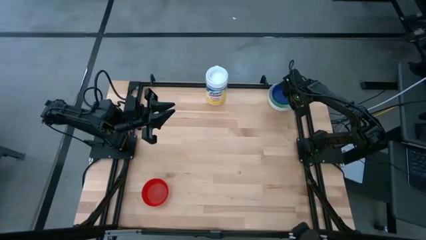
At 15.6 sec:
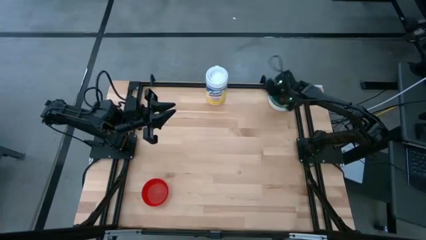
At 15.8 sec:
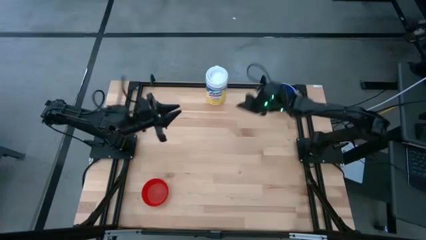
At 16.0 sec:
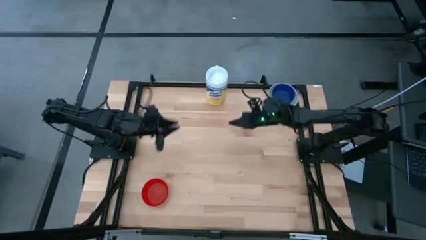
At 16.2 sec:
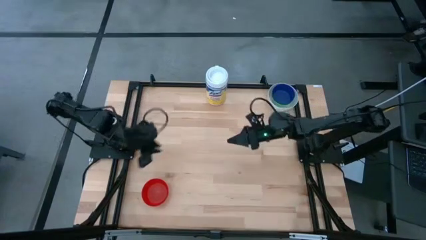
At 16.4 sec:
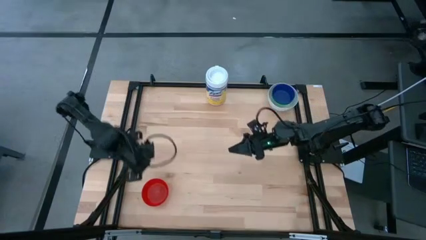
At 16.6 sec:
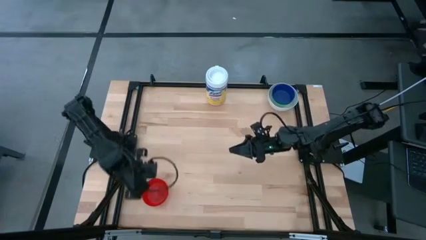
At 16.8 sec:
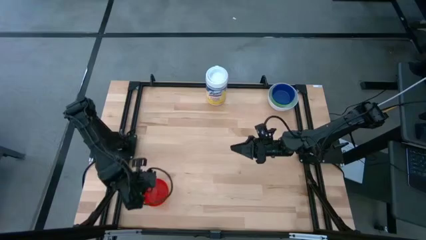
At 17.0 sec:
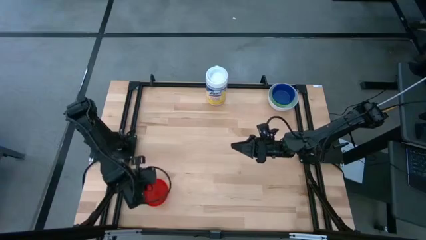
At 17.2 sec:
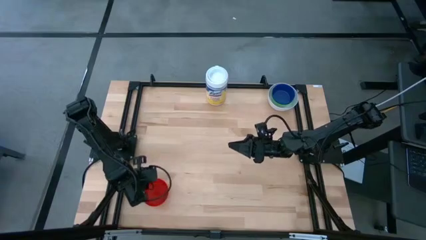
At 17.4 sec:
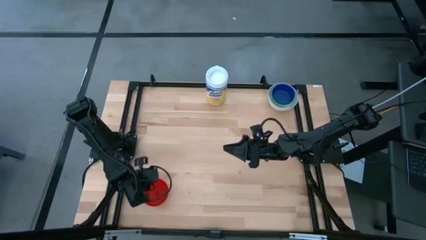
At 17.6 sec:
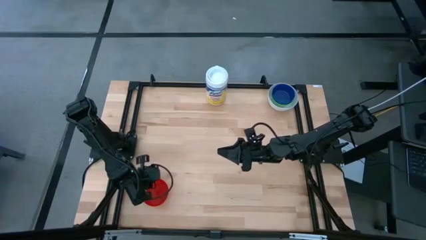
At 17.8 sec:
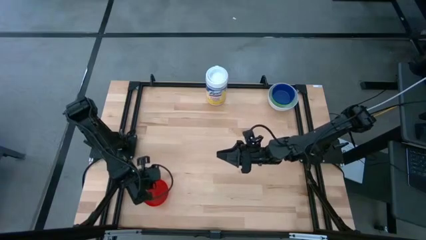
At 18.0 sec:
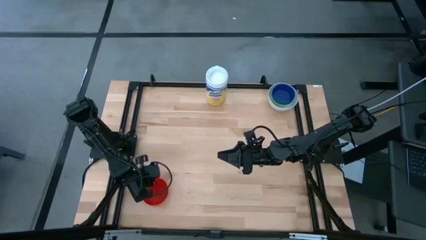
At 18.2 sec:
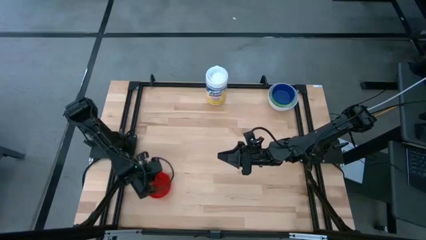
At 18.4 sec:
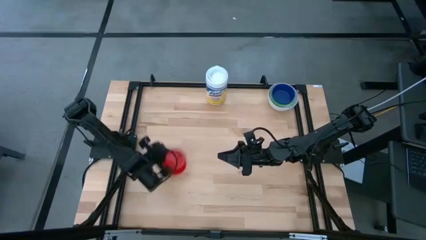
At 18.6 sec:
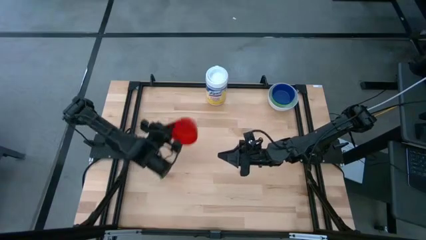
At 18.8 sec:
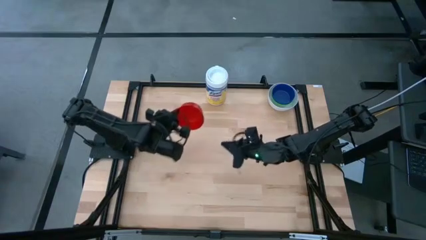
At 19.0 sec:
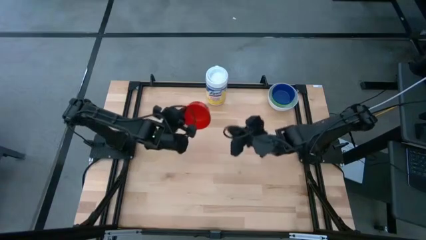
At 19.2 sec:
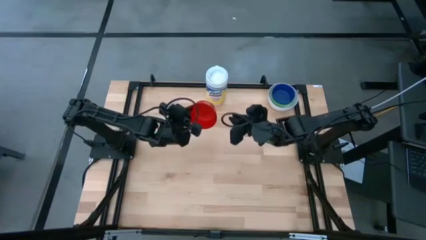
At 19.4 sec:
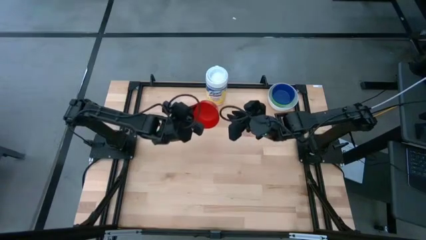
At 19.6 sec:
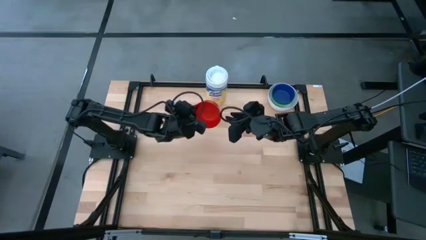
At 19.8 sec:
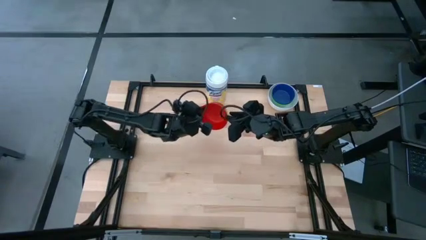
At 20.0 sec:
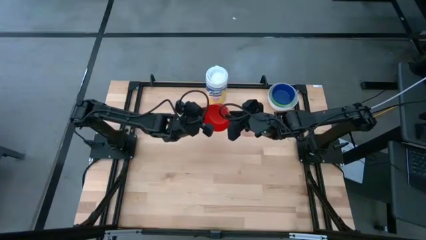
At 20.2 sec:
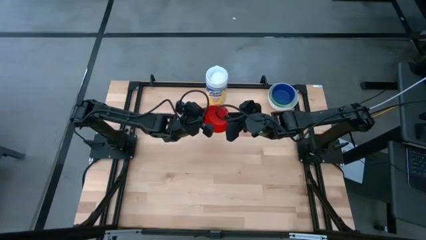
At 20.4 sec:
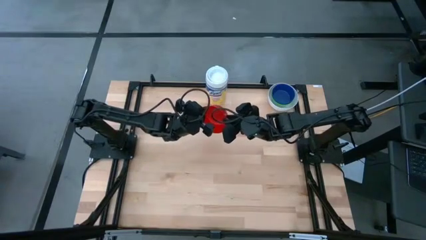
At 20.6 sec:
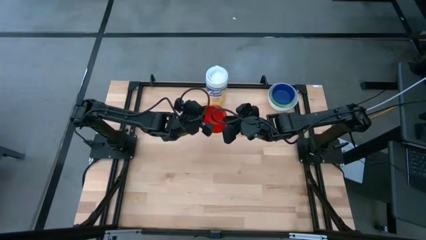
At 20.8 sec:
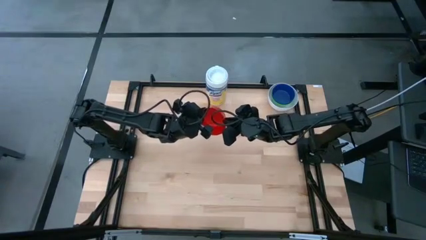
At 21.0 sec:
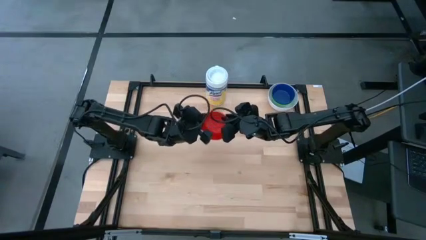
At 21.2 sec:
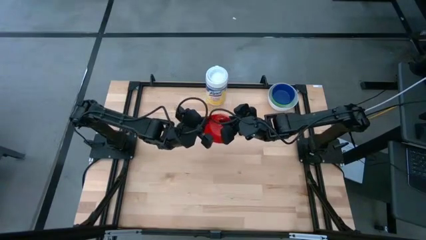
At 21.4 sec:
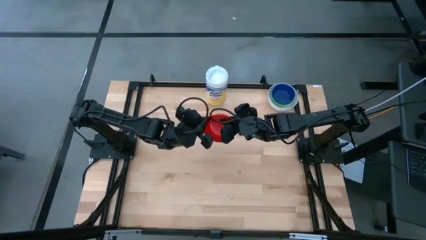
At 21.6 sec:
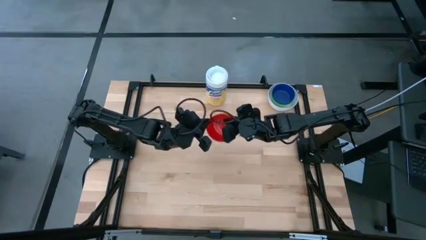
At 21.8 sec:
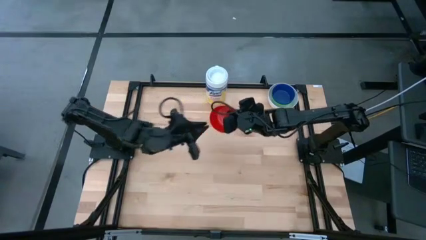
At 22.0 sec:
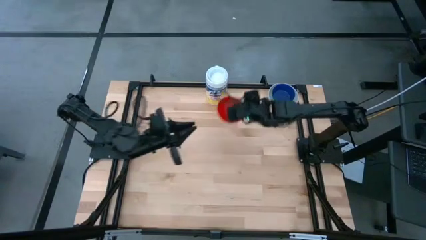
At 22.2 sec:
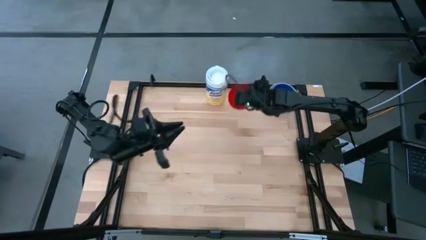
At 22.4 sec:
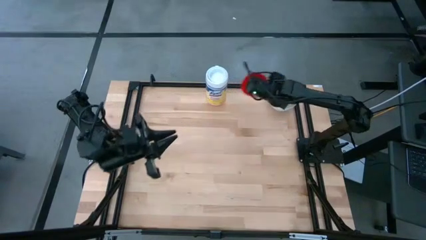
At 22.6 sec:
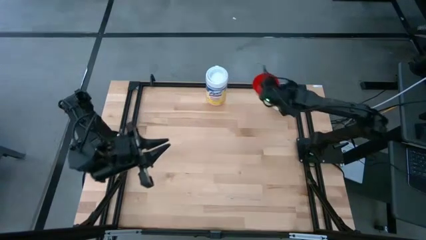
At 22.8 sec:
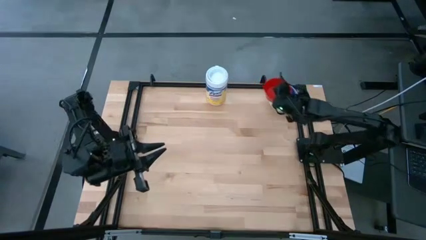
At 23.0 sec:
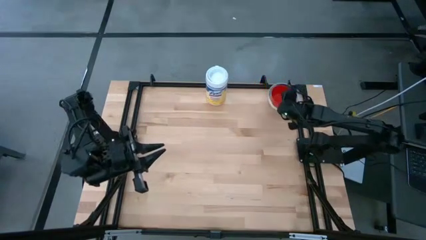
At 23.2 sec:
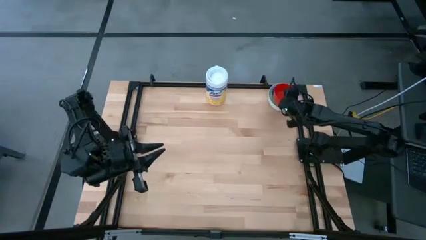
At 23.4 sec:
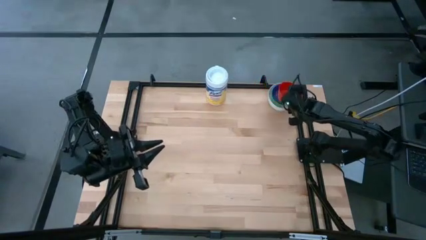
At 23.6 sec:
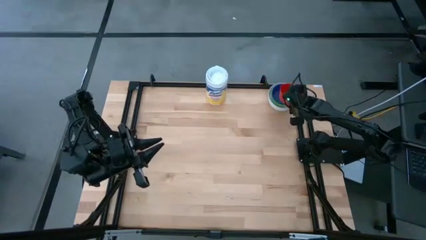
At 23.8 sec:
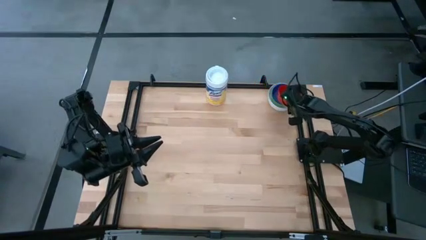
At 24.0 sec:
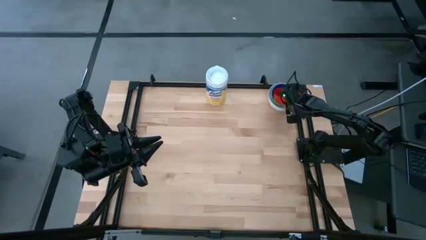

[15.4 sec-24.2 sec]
Stack the red bowl on the dark blue bowl

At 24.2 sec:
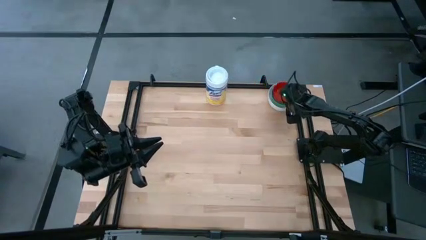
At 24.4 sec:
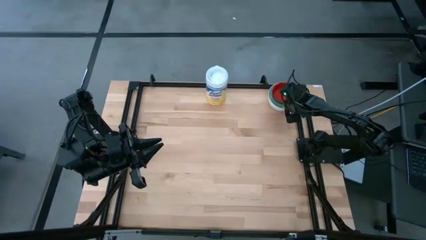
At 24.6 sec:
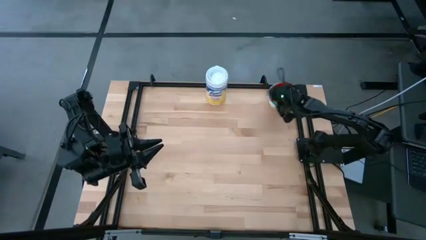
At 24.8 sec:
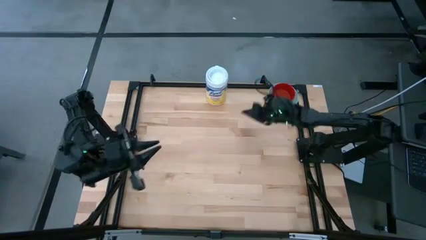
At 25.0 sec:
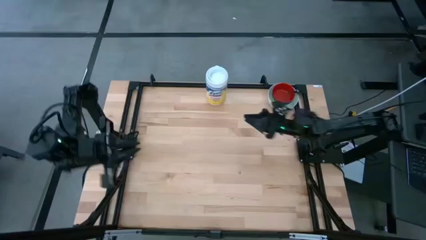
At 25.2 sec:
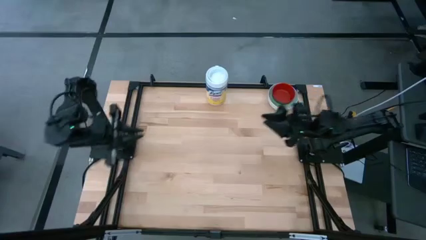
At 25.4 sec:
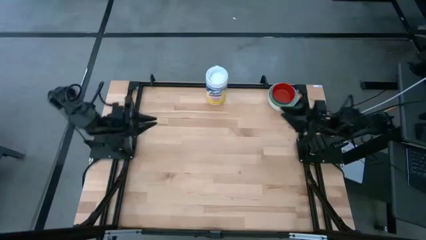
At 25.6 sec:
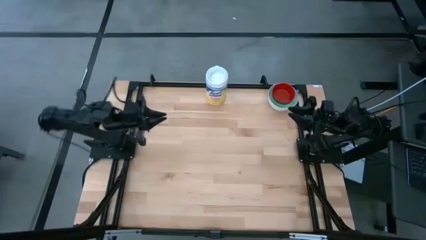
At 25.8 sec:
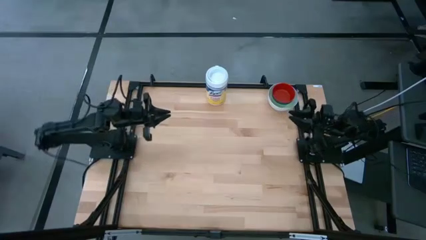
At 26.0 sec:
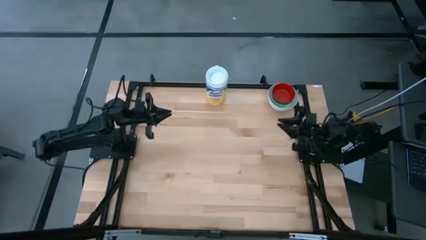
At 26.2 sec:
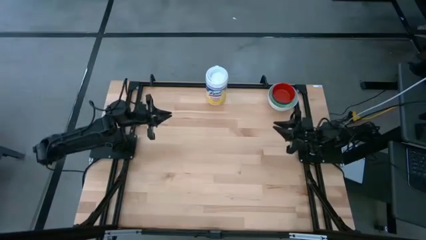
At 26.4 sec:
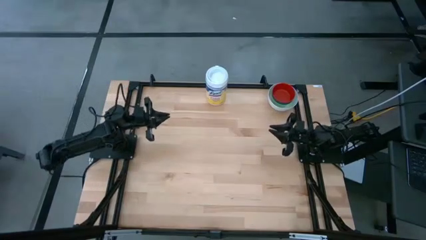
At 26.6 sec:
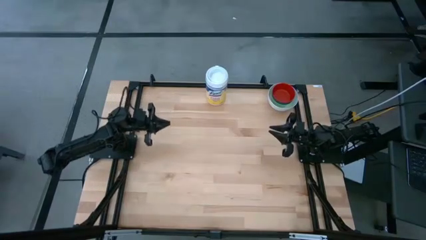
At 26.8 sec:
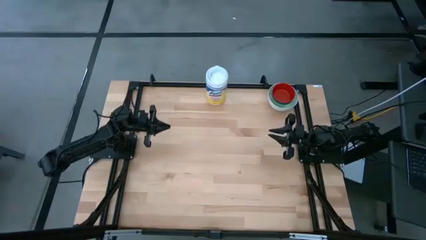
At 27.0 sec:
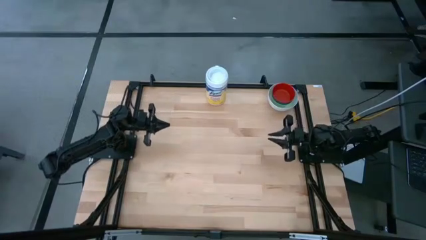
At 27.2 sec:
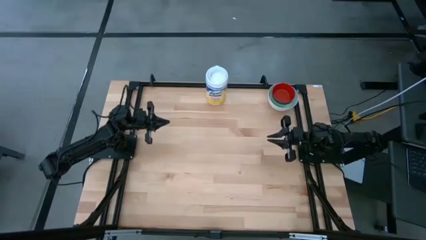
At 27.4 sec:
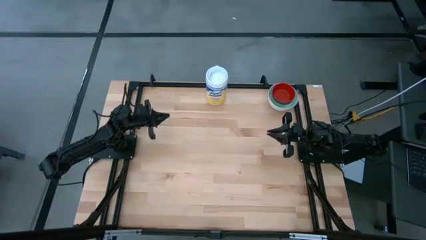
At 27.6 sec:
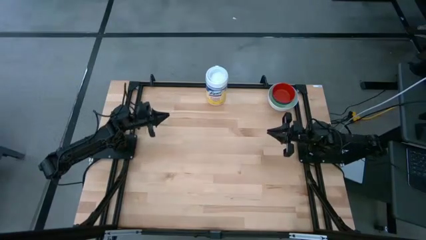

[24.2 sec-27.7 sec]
Return to Home Position

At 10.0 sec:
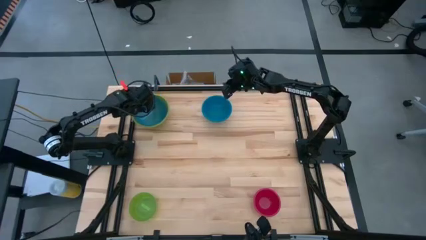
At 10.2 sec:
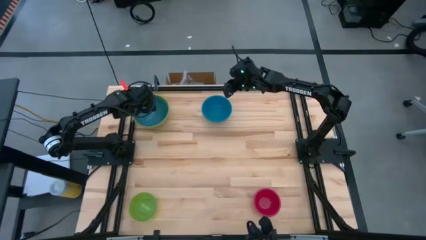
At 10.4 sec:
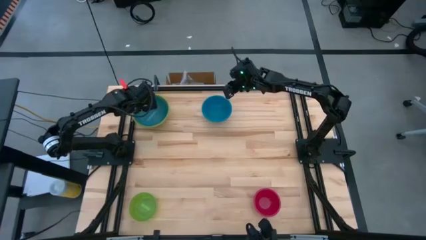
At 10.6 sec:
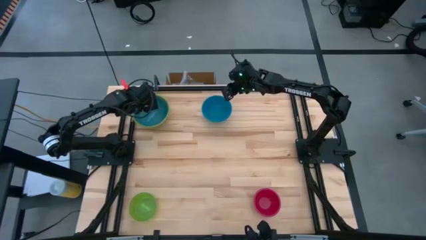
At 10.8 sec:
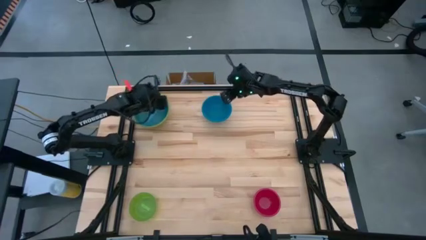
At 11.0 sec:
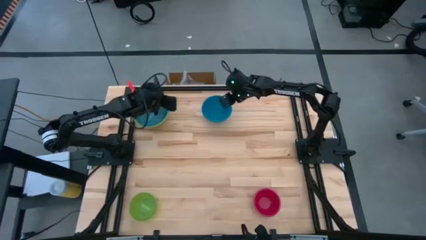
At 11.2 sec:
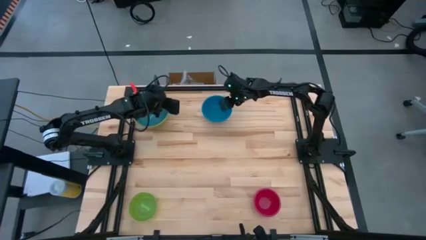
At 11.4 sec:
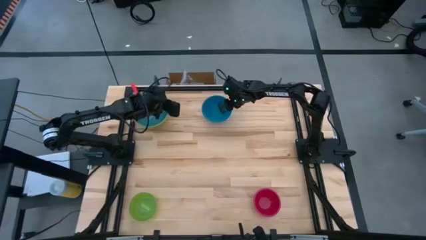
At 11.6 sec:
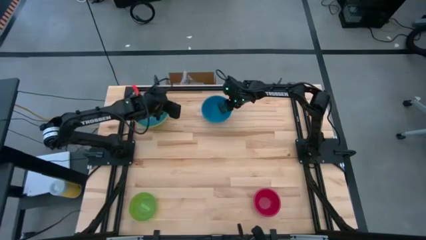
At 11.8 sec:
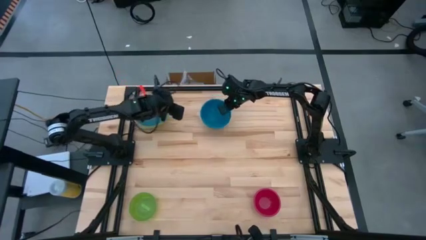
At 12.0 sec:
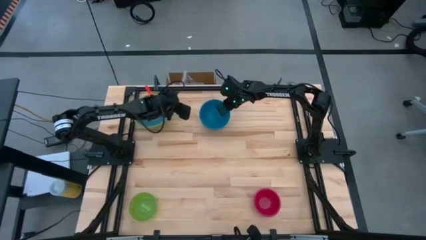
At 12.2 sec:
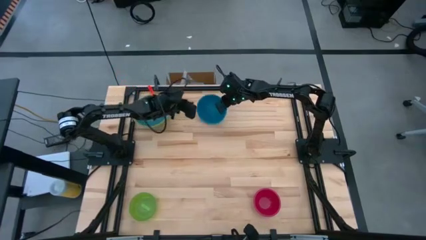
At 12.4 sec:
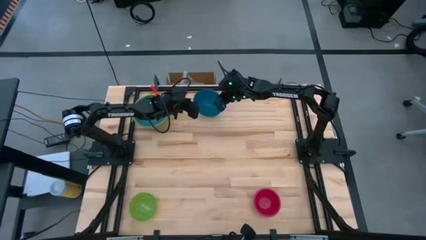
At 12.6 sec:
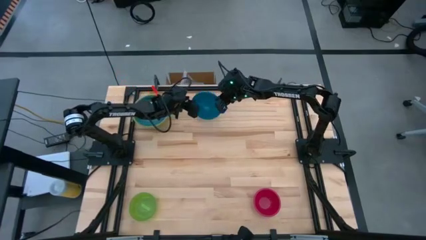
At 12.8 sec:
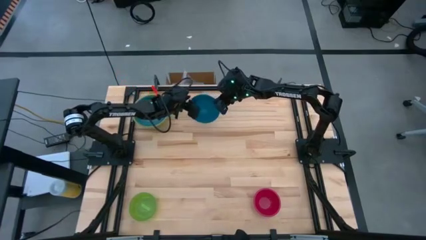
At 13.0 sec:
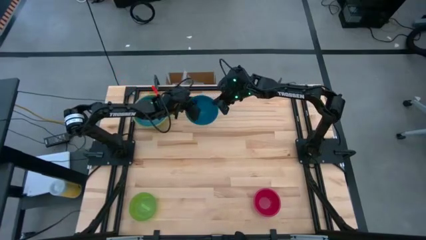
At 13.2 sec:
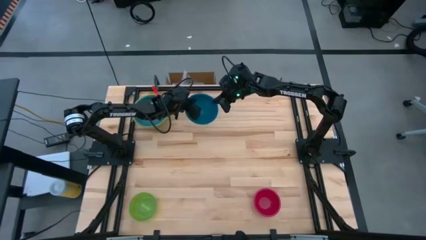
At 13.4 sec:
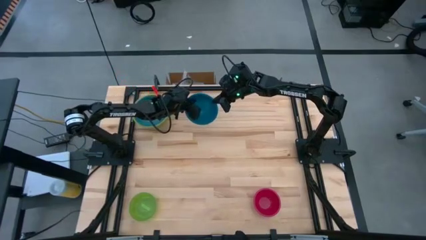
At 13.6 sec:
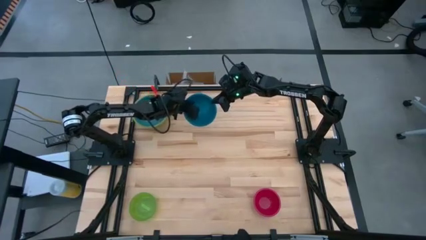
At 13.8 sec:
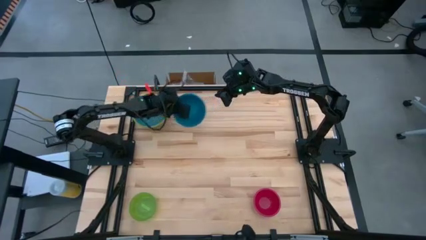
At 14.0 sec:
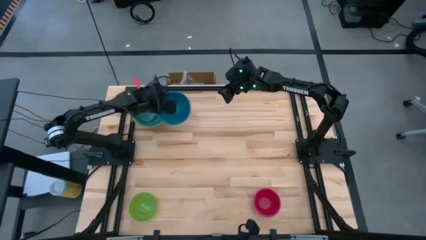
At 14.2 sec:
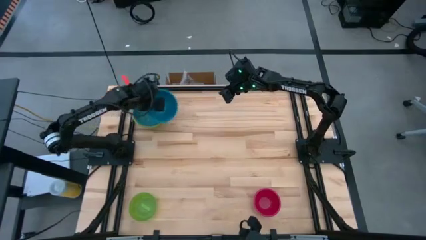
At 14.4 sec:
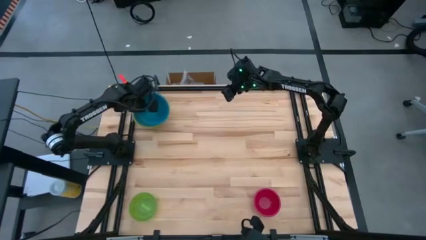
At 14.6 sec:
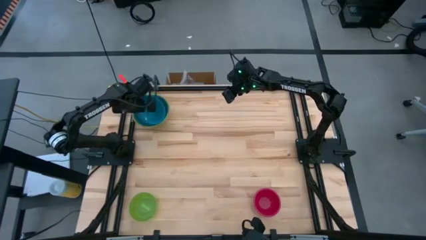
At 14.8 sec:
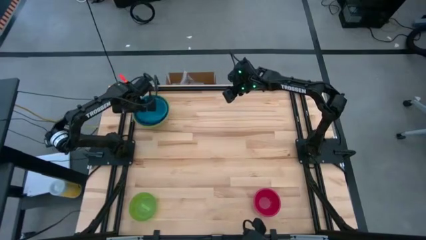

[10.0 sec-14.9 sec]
Stack the blue bowl on top of the light blue bowl
